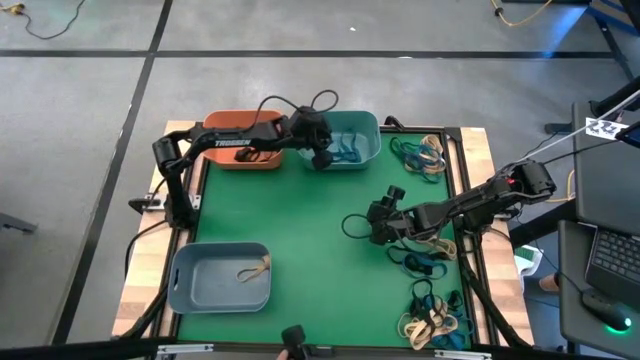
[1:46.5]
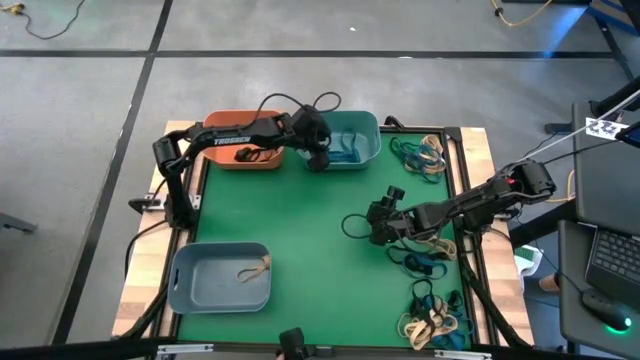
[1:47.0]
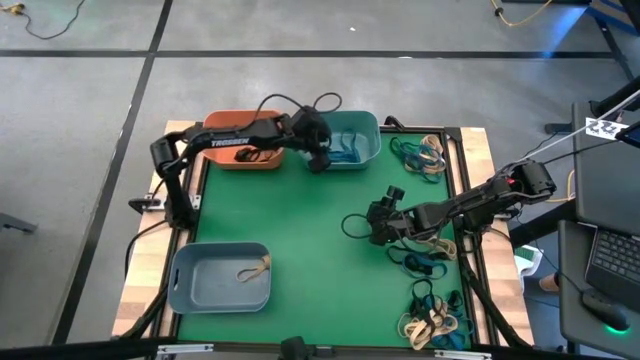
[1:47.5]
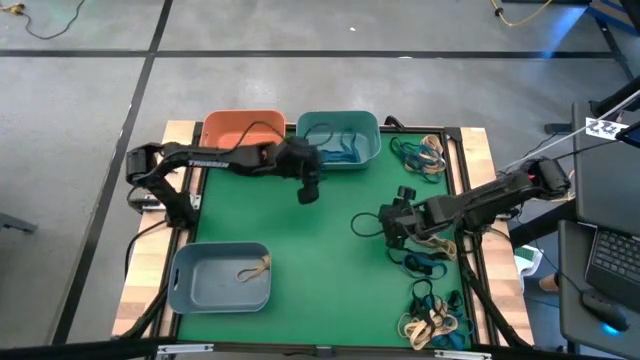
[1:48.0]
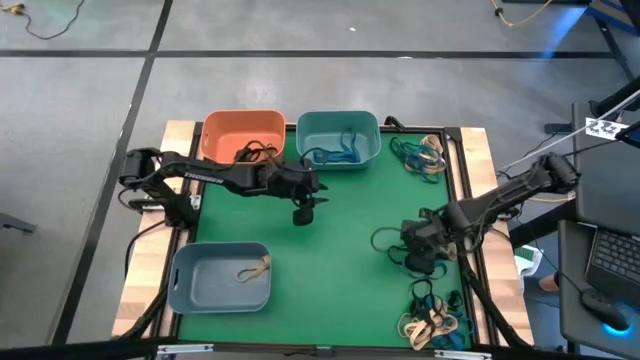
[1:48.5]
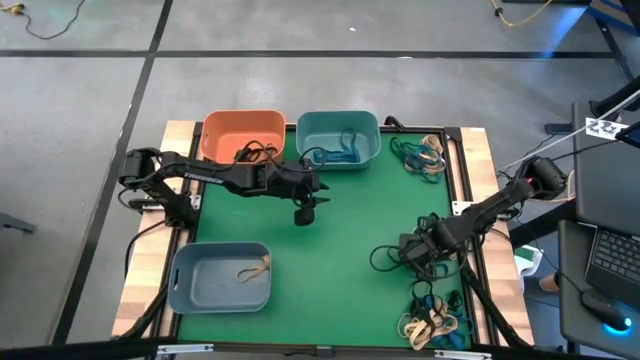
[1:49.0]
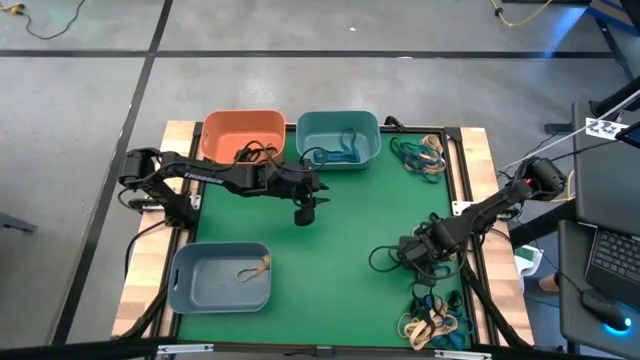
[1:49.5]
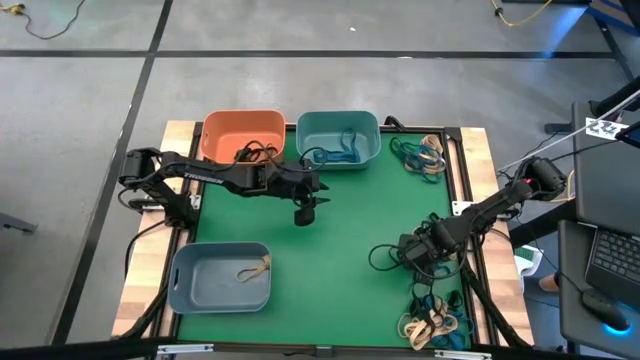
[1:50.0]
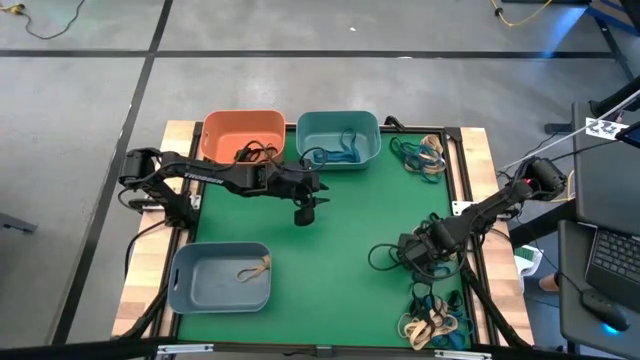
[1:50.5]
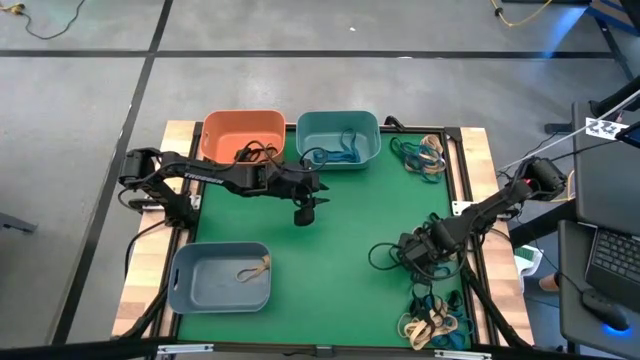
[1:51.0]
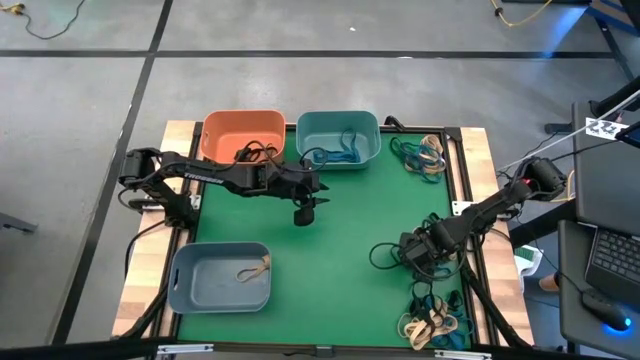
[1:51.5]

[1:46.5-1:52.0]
Task: Sort rubber bands into baskets
Put the blue rubber band into the green bin

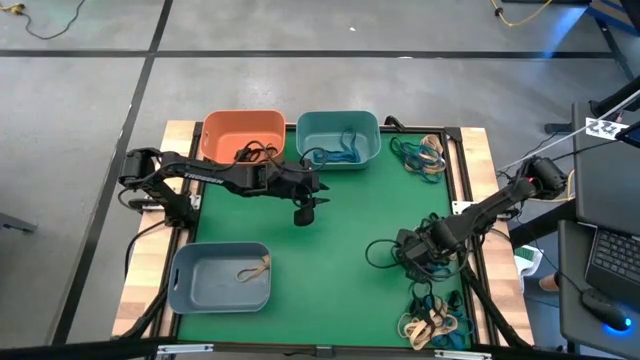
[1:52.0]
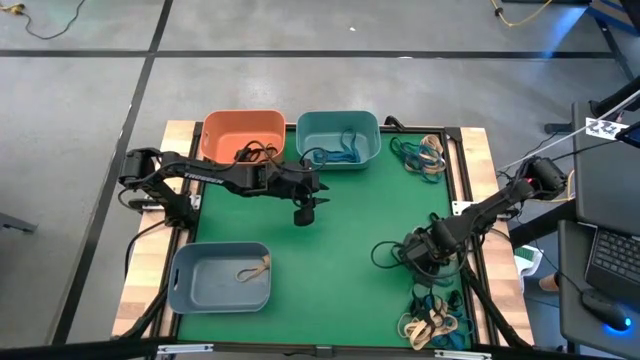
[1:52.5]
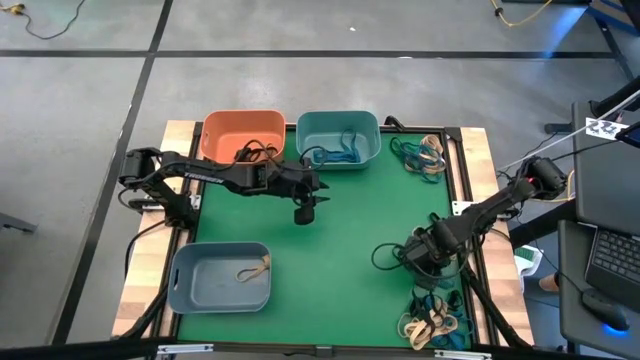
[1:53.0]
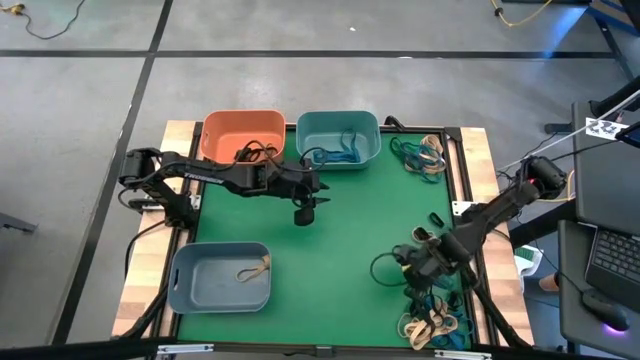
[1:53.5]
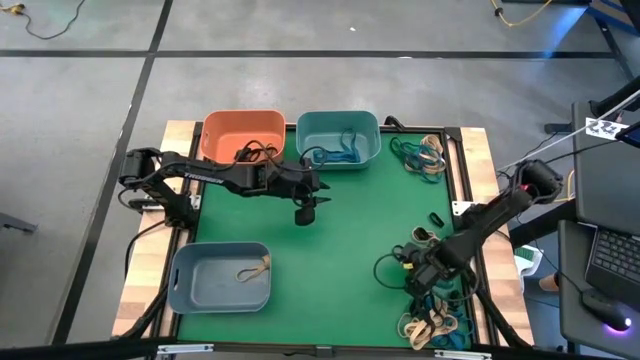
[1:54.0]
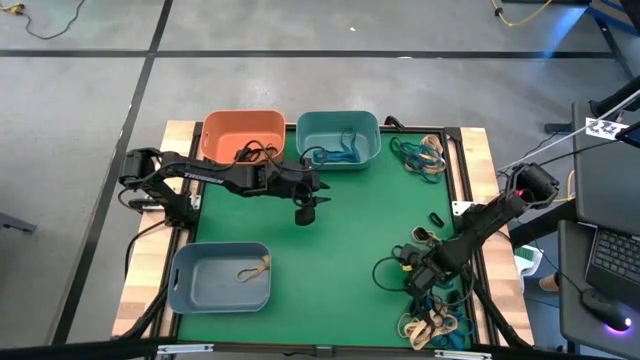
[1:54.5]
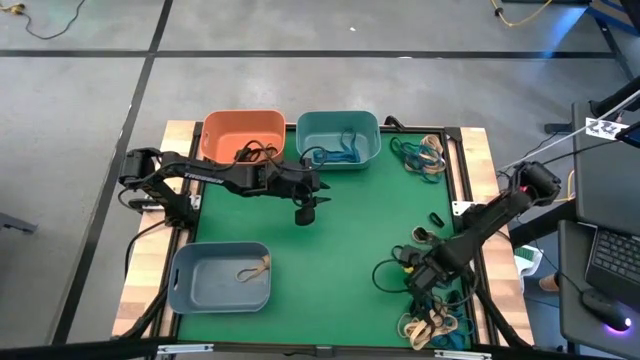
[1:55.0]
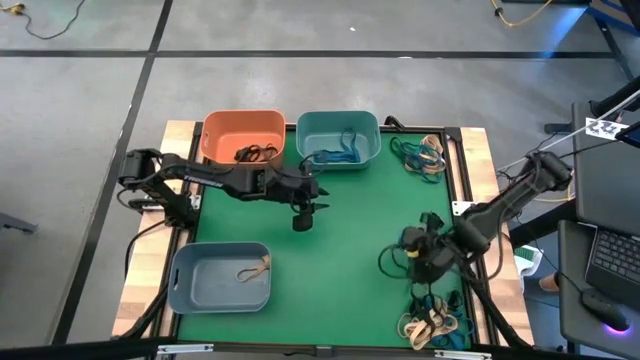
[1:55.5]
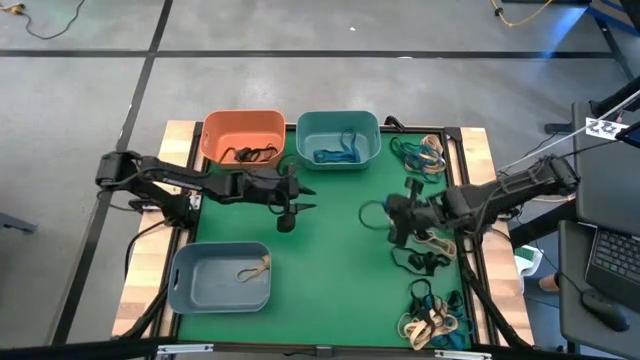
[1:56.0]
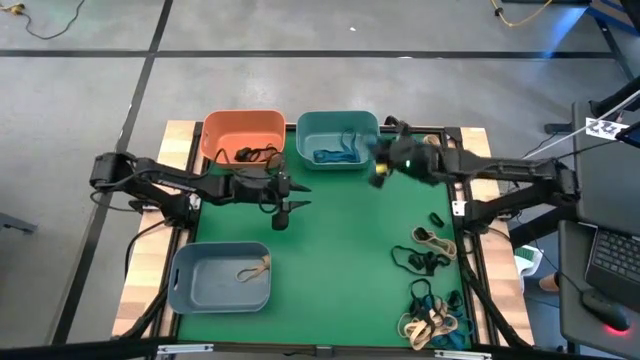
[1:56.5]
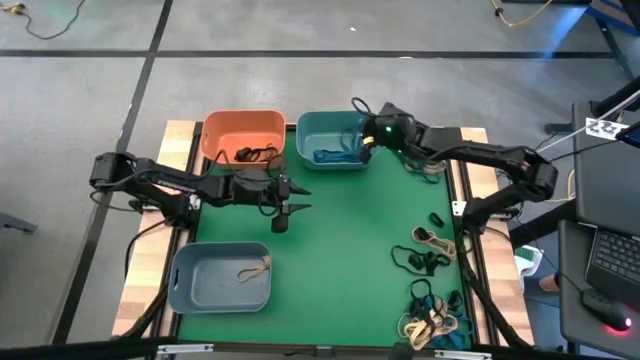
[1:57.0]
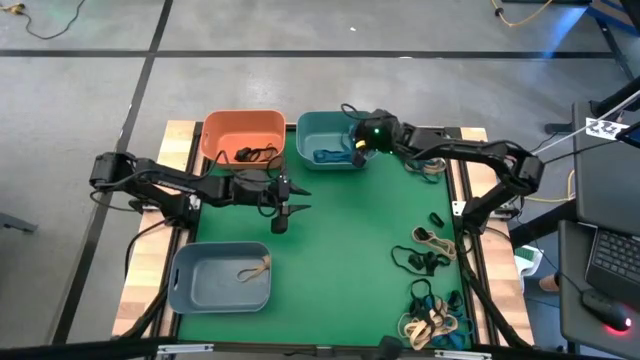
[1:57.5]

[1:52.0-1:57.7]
Put the blue rubber band into the green bin

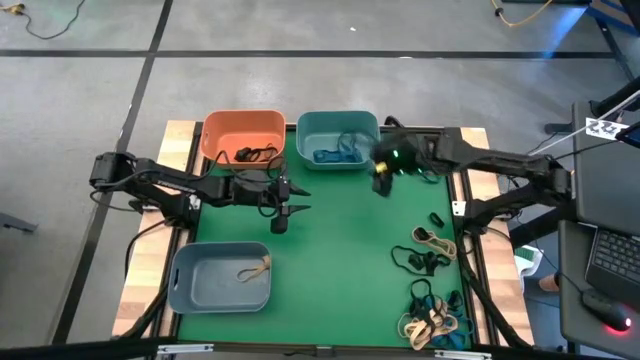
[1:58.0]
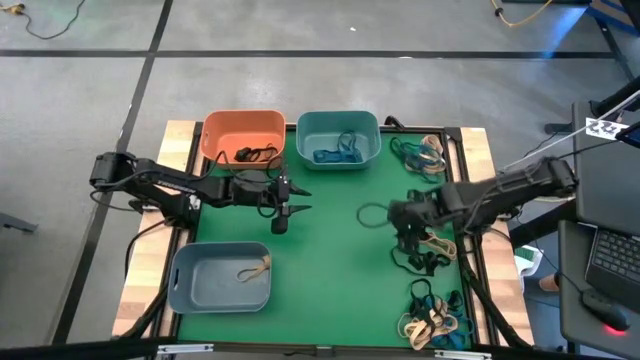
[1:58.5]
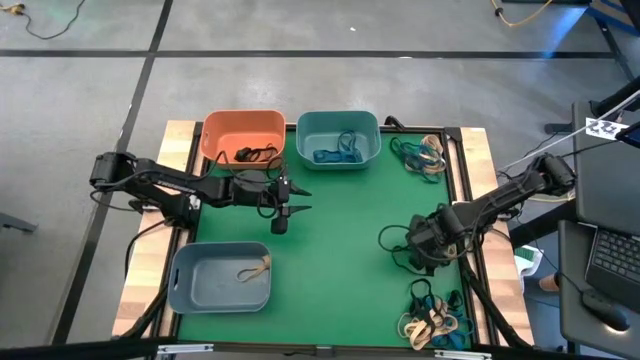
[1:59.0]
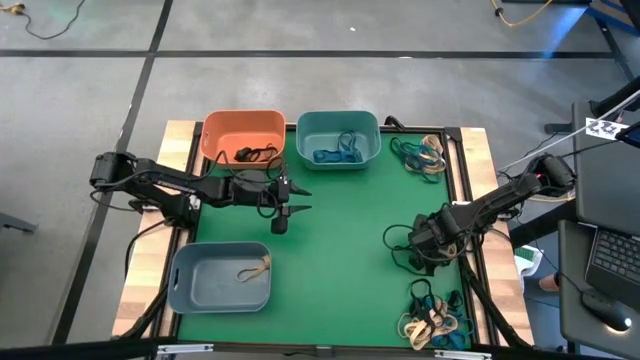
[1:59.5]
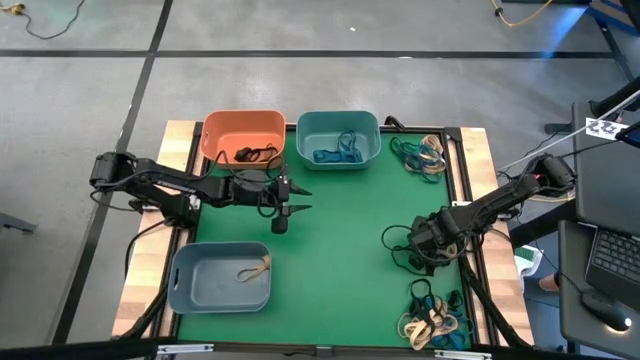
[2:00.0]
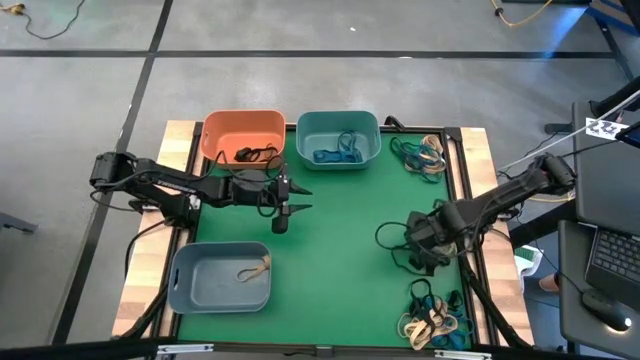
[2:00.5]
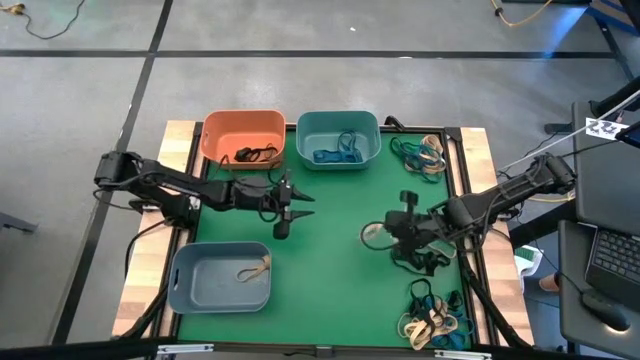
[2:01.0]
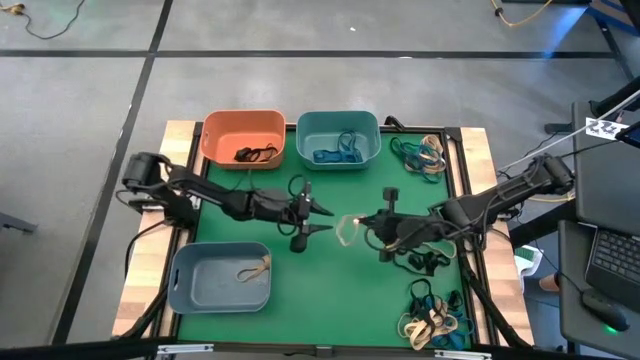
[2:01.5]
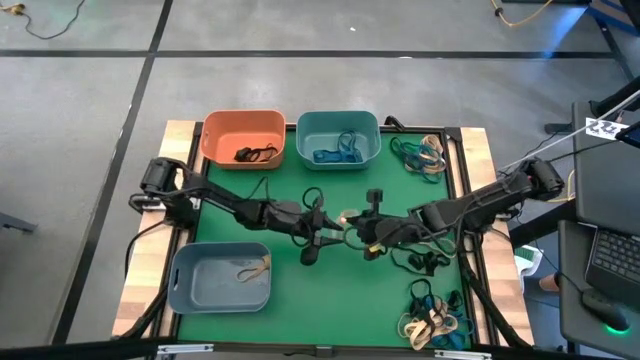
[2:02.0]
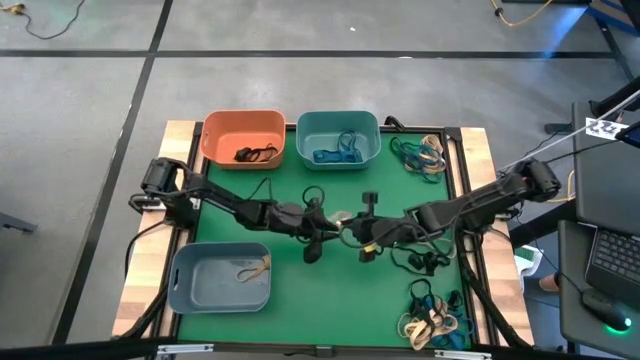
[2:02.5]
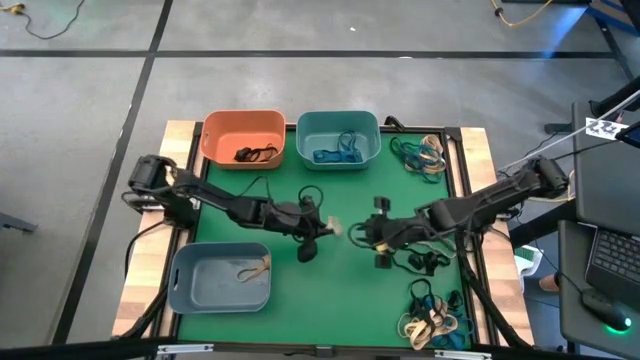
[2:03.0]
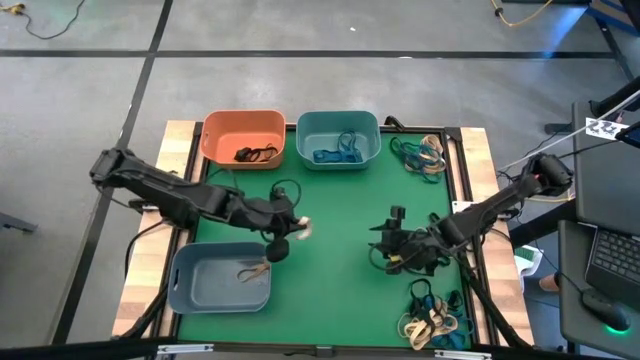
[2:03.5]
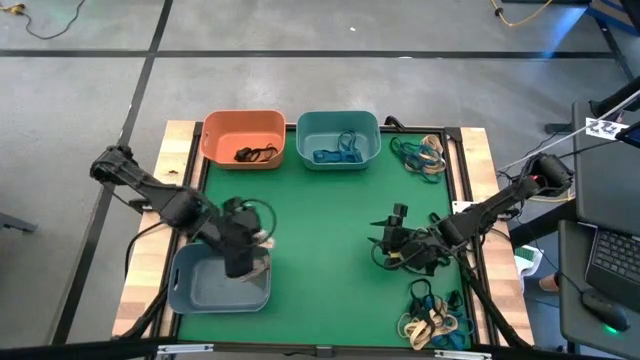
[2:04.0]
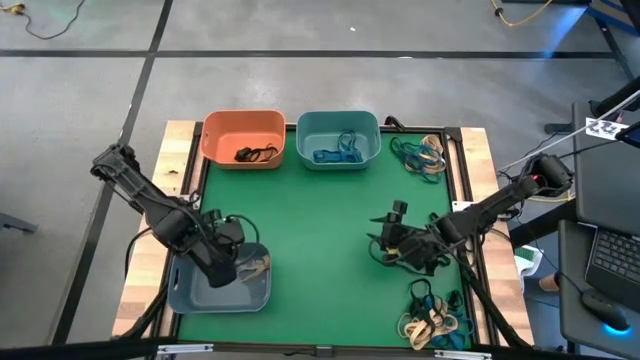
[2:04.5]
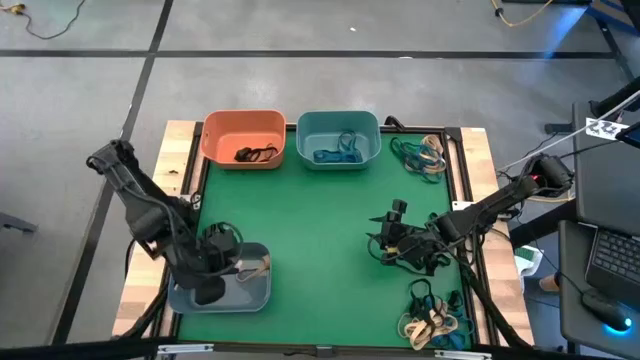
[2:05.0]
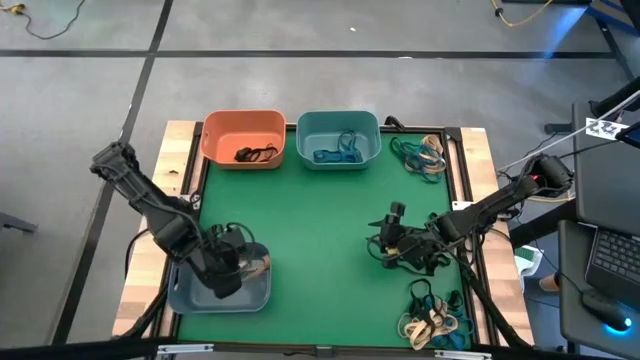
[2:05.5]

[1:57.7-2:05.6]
Put the white rubber band into the blue bin

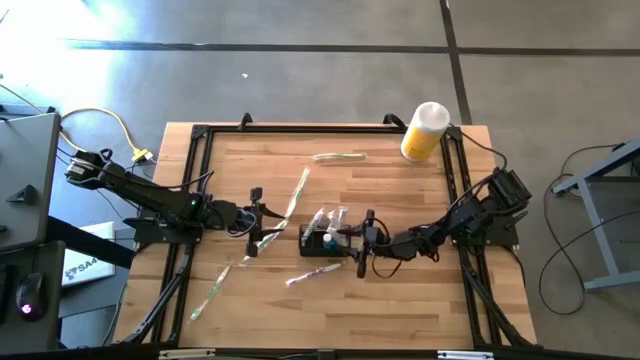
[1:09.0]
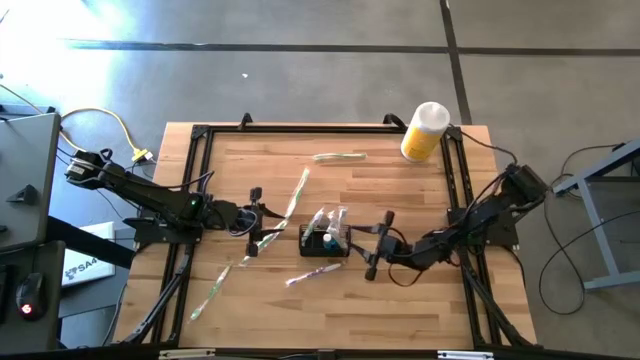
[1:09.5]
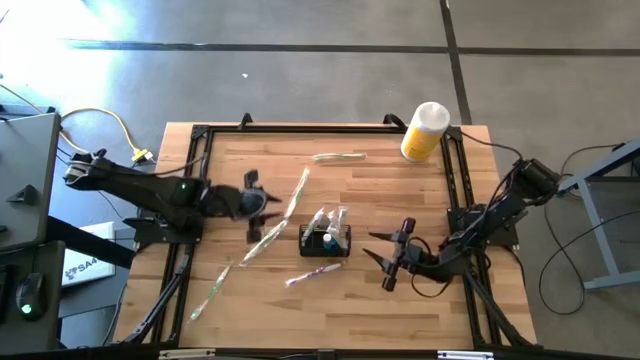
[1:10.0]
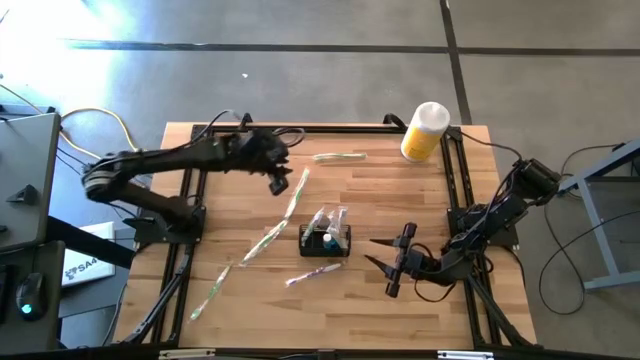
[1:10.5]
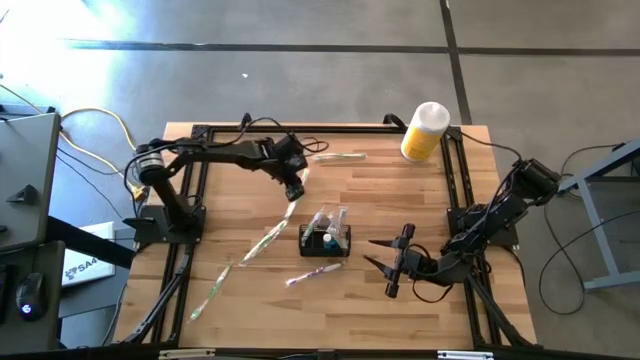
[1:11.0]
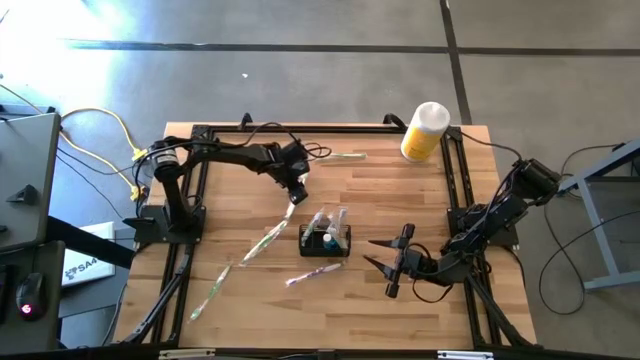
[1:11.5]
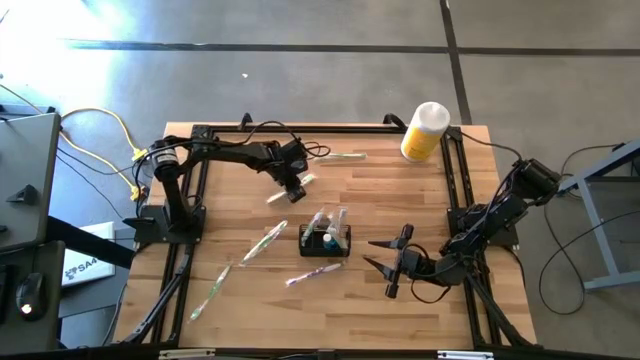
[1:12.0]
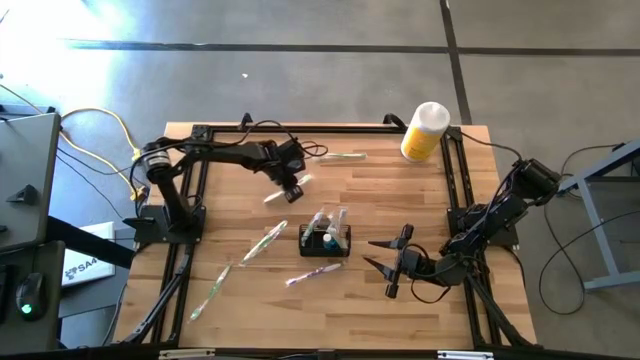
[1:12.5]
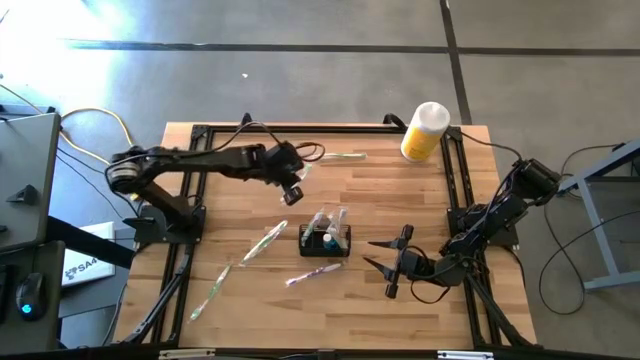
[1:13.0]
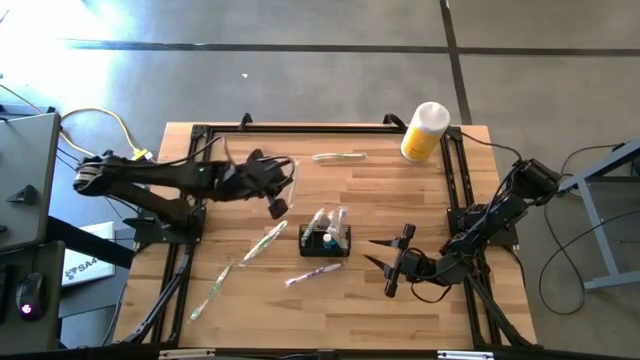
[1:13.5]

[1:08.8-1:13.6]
Task: Pick & Place toothbrushing station
Put the green toothbrush into the black wire organizer
